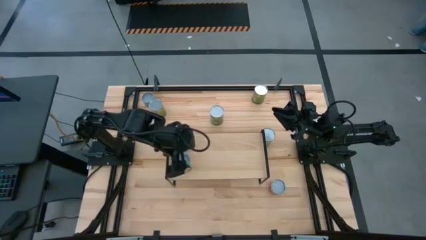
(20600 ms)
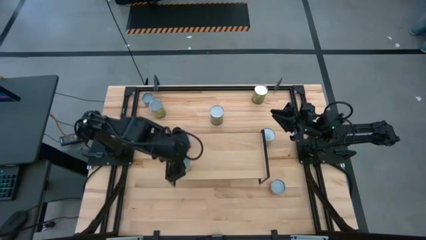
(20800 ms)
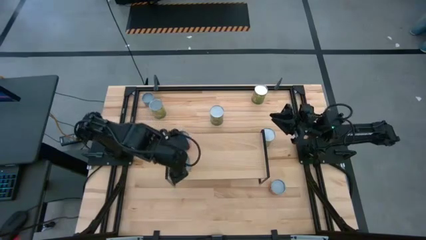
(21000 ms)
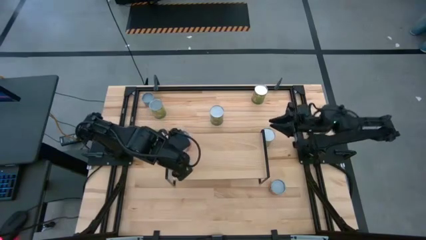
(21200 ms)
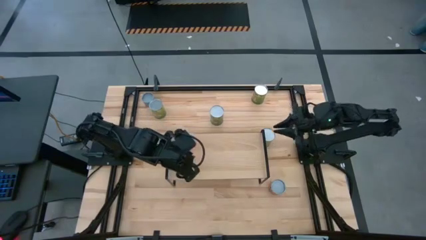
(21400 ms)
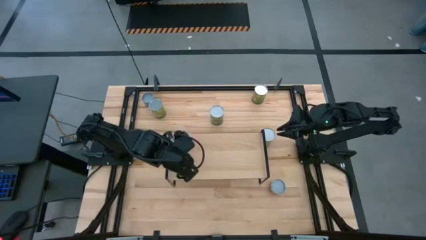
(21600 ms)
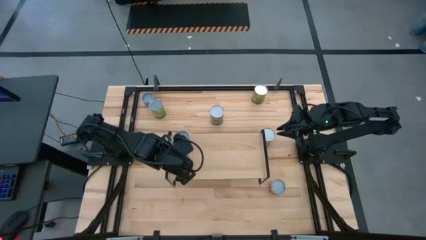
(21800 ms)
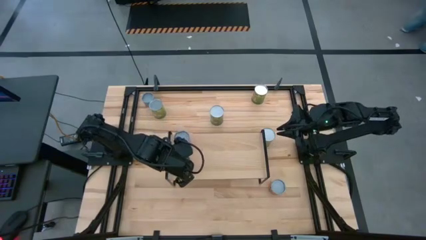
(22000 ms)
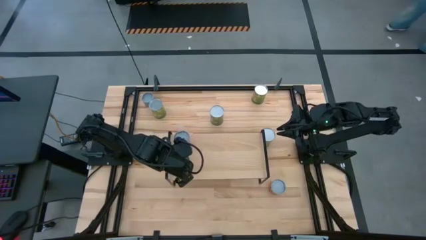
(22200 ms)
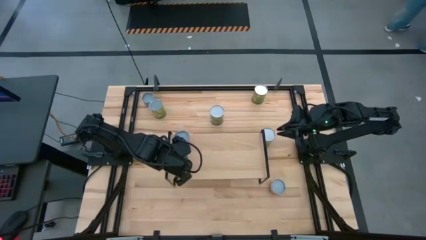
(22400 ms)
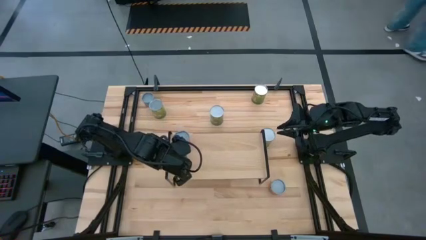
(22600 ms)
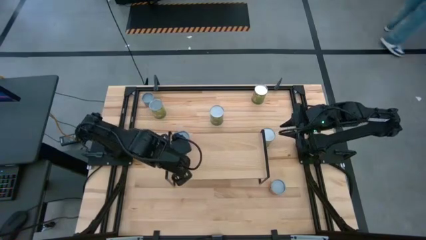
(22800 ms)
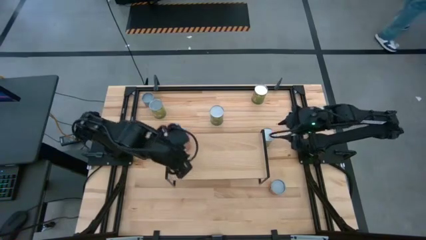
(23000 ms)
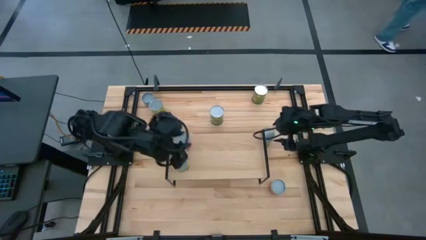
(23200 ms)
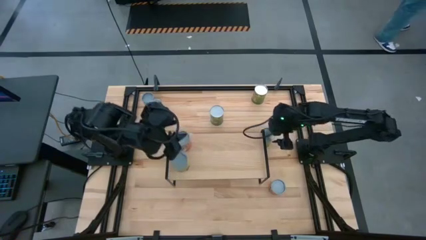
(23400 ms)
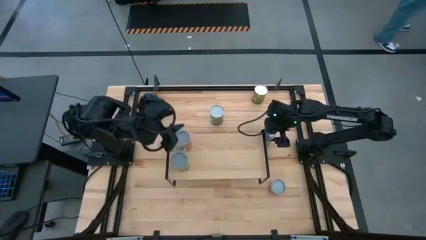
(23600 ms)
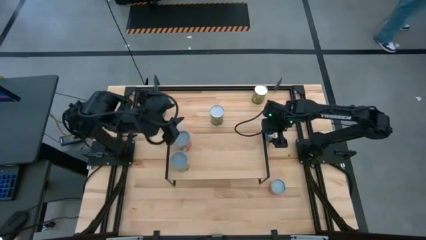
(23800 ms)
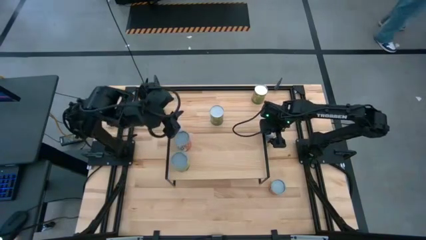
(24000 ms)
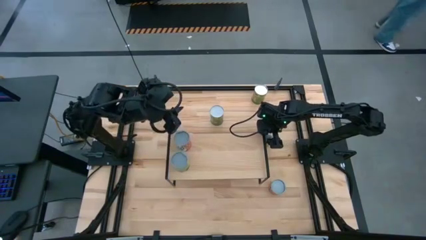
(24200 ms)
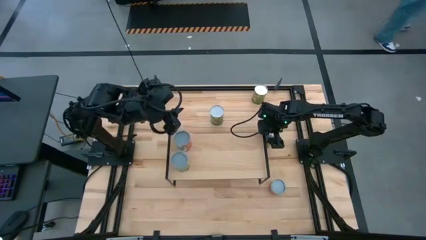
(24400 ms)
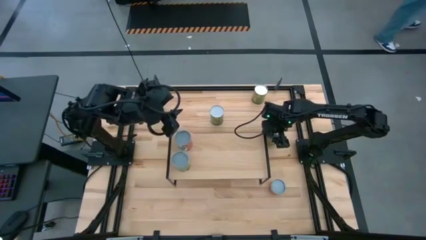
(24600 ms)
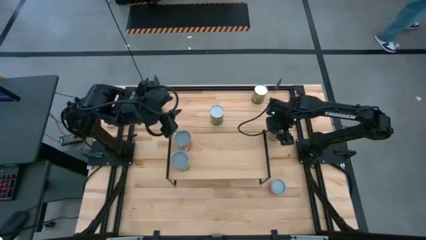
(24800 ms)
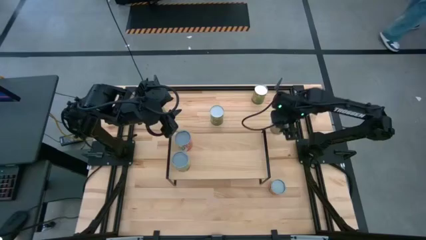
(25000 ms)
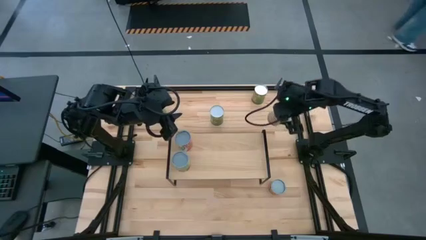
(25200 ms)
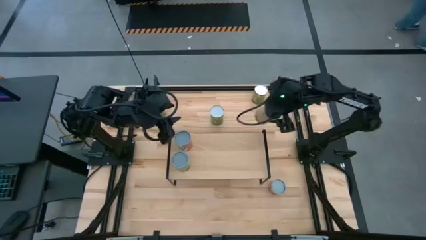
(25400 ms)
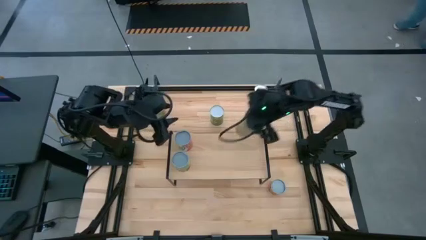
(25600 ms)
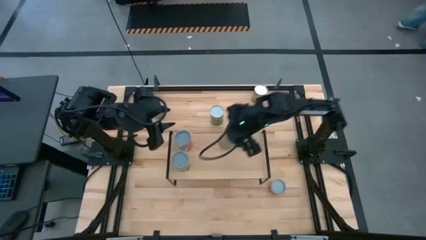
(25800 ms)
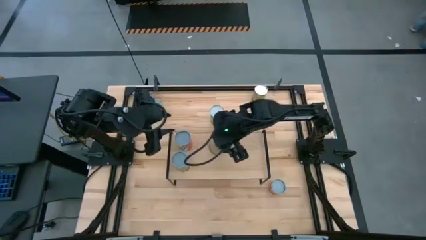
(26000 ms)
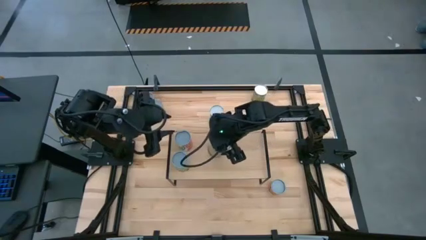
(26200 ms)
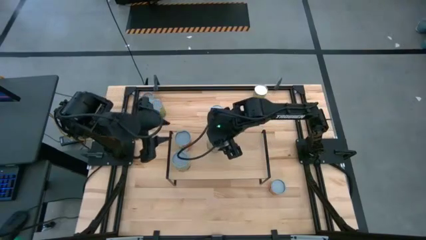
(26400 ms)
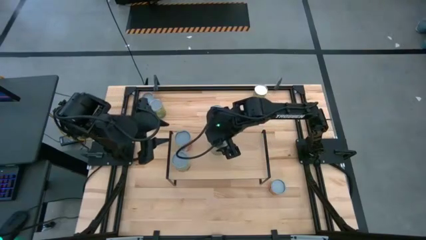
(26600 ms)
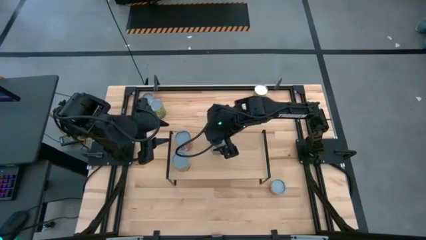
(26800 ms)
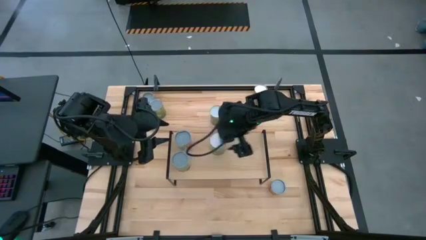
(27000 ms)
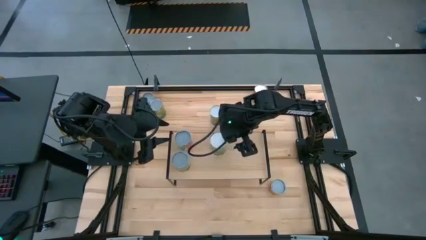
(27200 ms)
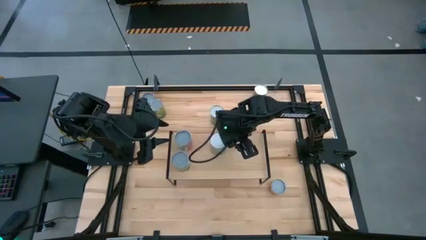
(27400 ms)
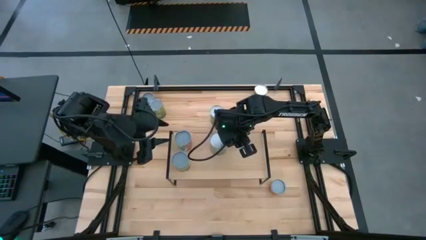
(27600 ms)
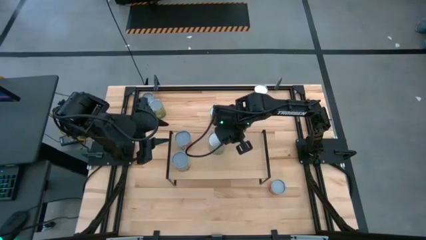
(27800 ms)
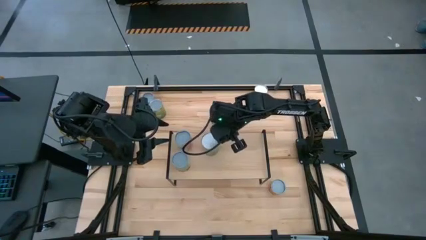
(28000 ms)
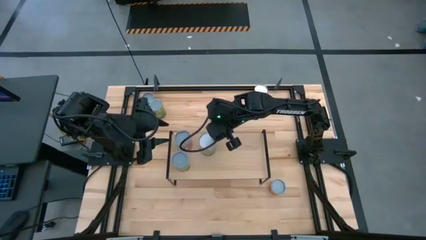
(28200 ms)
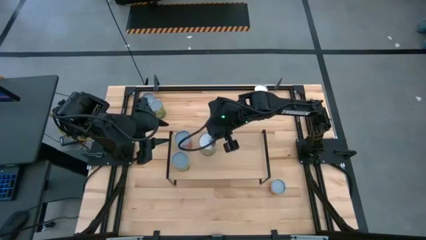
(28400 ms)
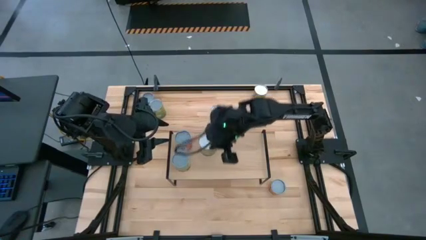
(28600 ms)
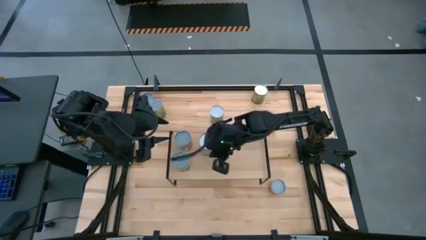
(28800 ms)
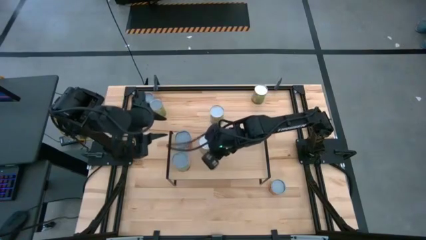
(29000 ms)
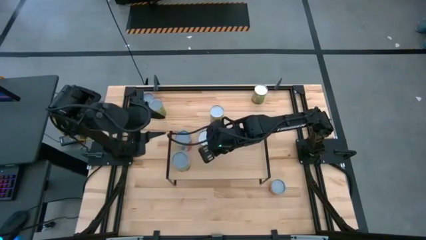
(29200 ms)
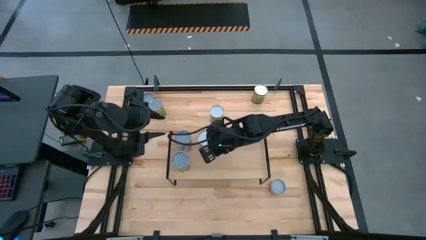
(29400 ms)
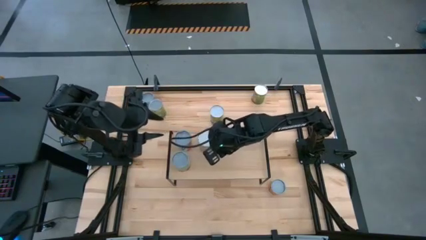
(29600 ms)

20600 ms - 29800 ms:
Task: Pick and place cans onto a shelf
Put the bottom right large canned oranges on the shelf

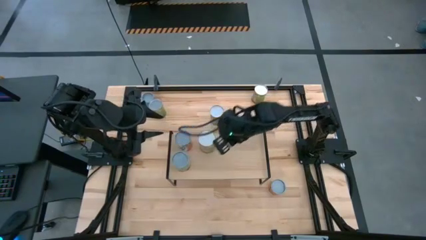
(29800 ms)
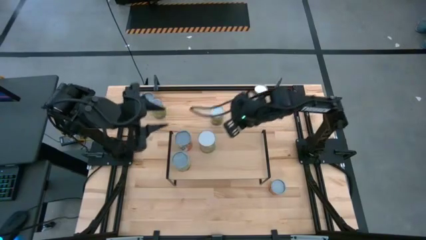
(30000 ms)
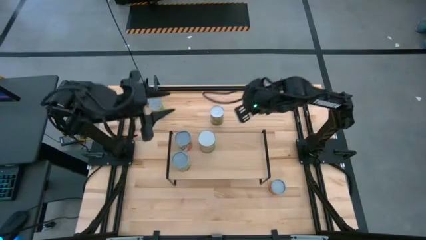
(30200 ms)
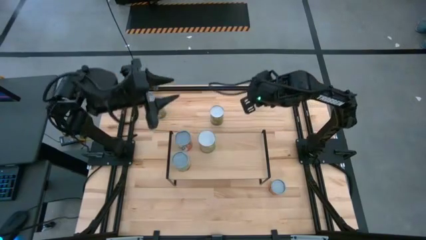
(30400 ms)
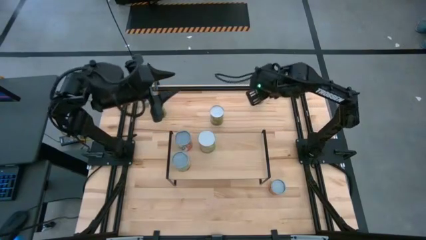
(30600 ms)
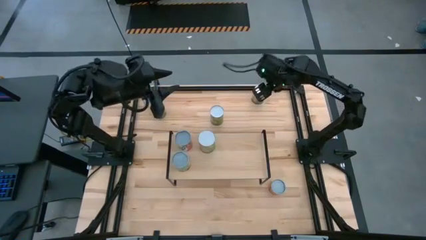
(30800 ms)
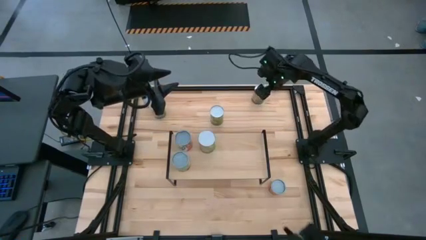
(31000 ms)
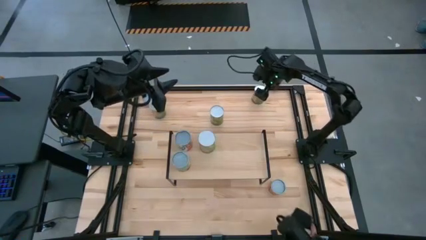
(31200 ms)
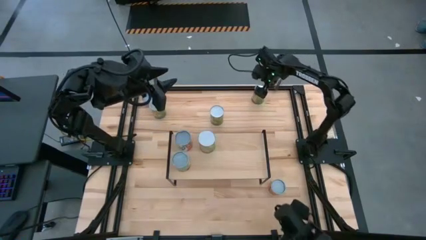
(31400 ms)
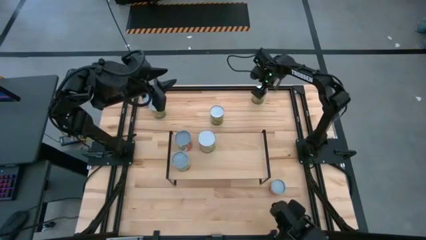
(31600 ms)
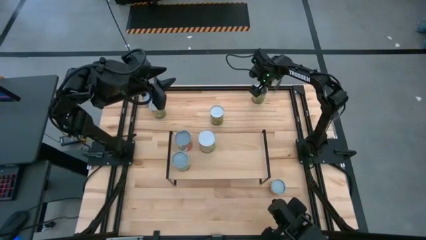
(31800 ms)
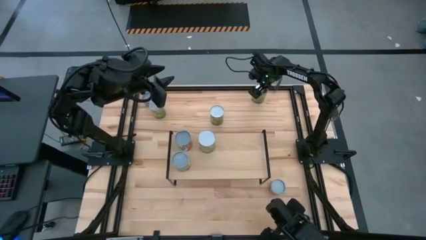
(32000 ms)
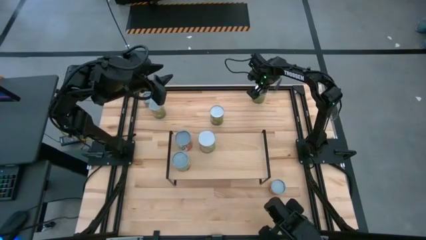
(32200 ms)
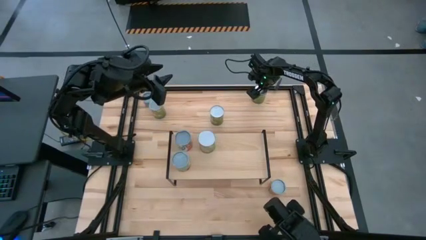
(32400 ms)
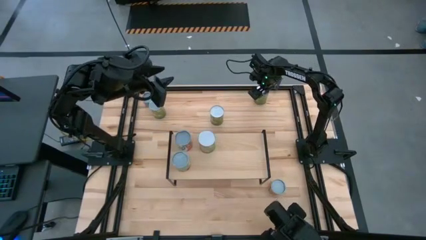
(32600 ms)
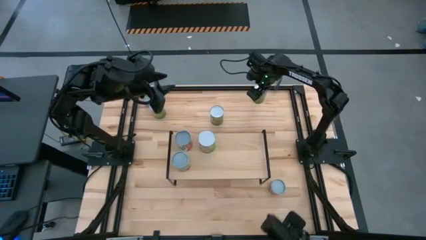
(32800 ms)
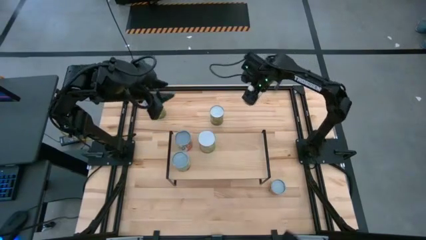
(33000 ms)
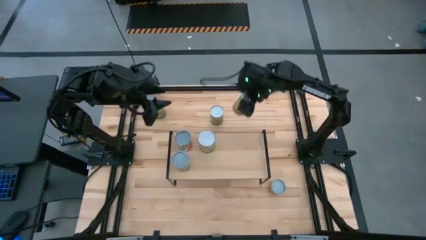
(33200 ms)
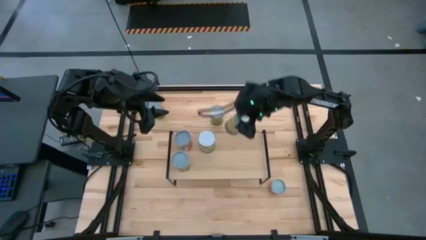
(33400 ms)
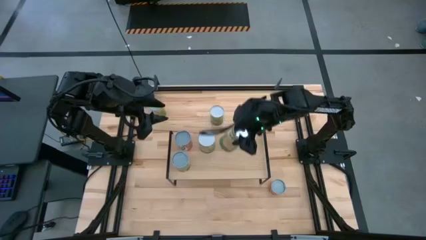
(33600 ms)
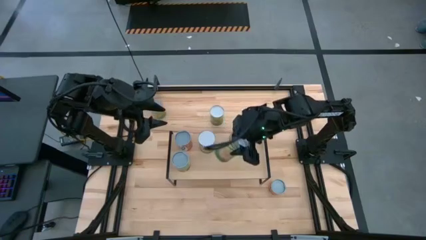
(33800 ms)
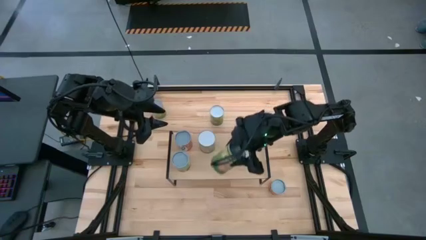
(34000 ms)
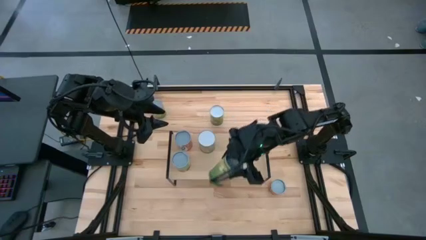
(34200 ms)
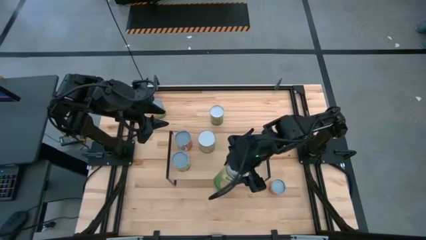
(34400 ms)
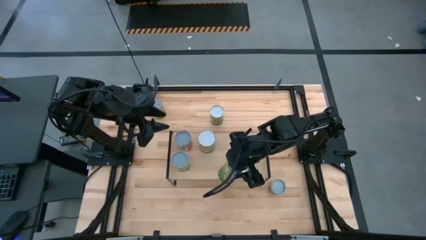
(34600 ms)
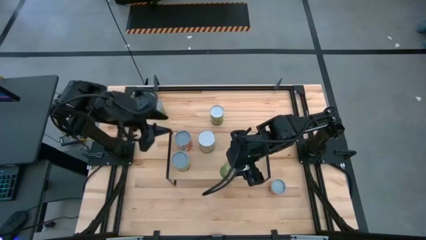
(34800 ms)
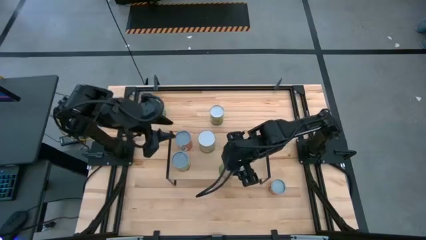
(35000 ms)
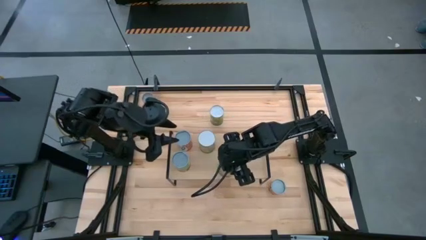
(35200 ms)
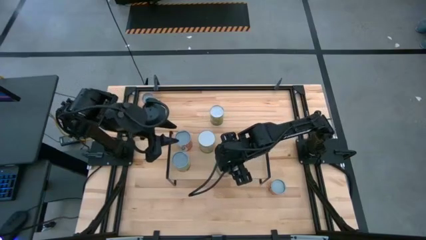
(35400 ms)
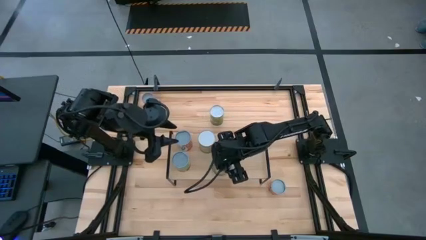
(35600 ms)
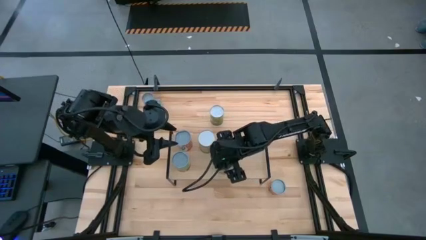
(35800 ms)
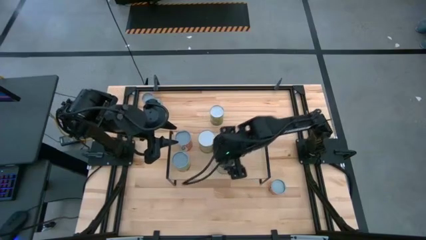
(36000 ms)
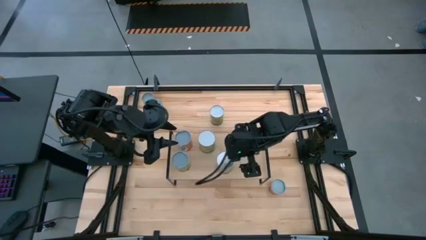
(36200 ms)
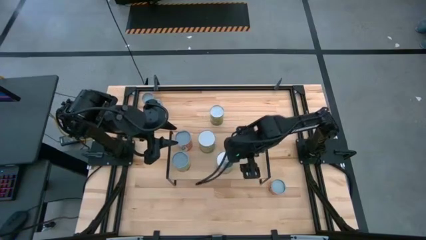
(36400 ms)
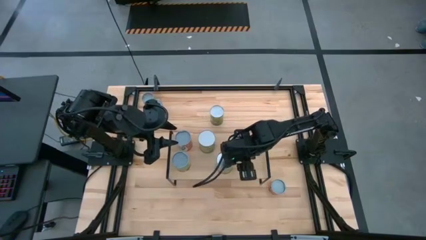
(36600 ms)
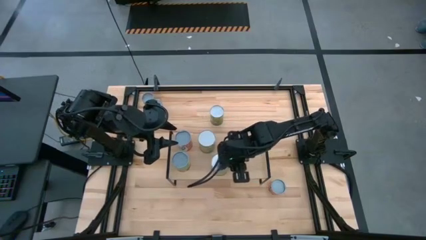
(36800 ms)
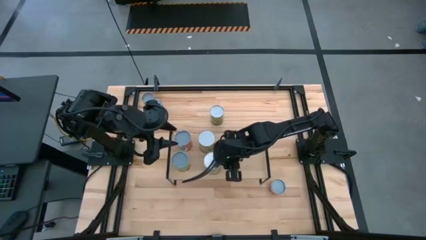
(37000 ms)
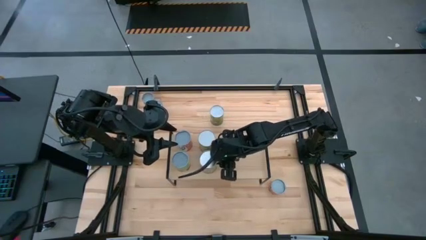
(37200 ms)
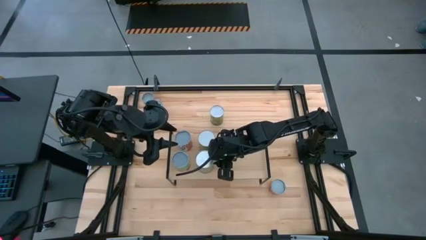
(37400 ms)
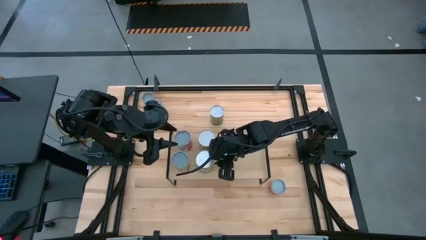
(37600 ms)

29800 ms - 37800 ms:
Put the top large canned oranges on the shelf aligned with the other large canned oranges
